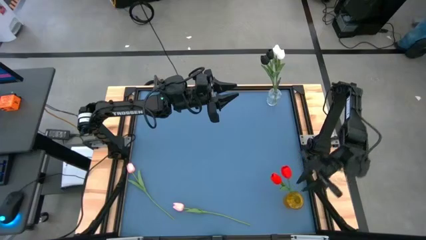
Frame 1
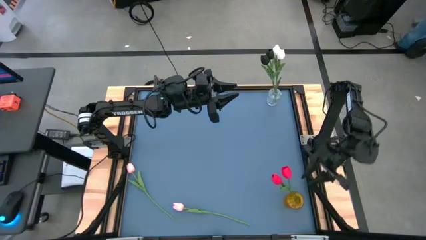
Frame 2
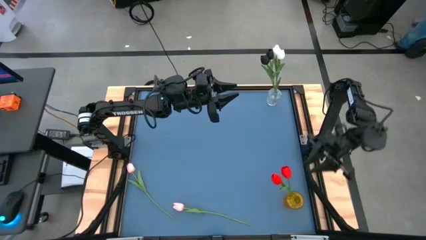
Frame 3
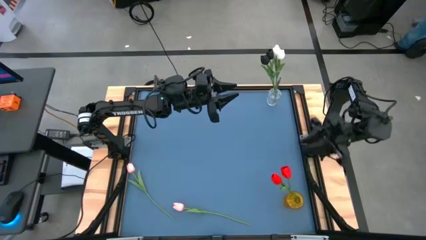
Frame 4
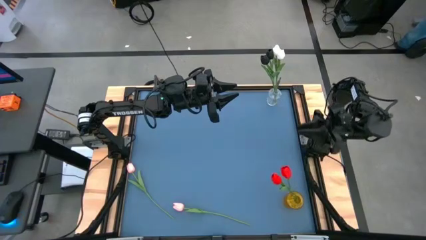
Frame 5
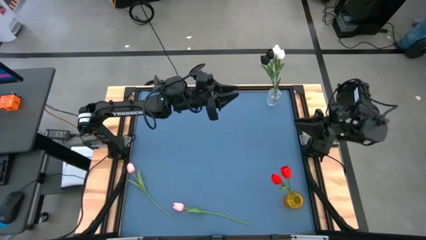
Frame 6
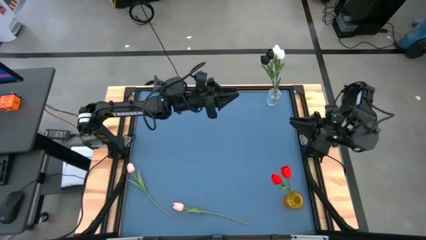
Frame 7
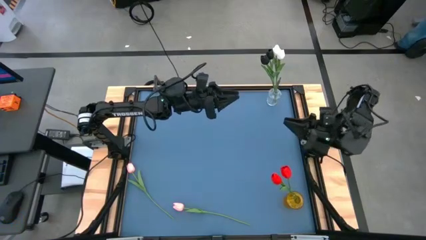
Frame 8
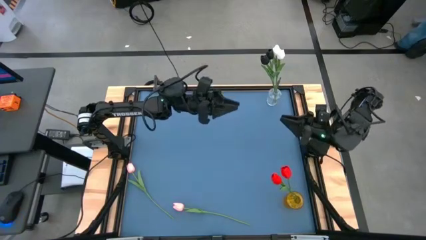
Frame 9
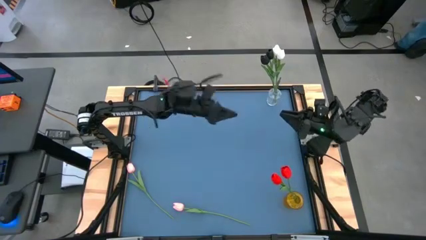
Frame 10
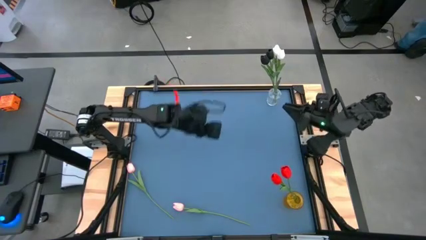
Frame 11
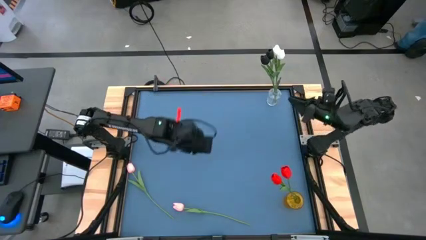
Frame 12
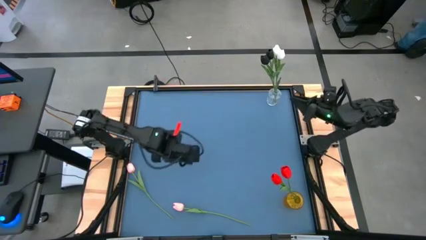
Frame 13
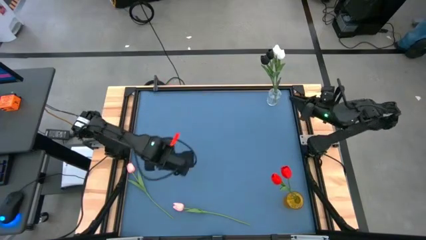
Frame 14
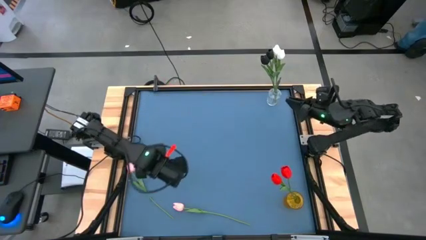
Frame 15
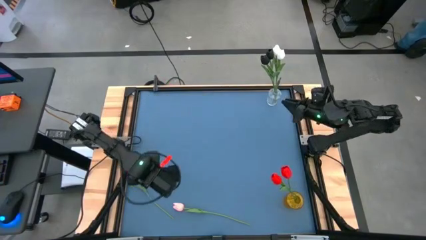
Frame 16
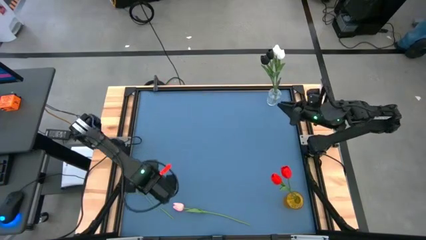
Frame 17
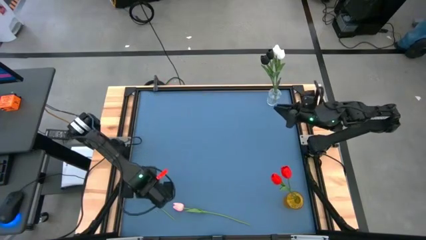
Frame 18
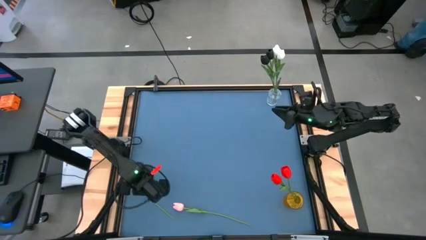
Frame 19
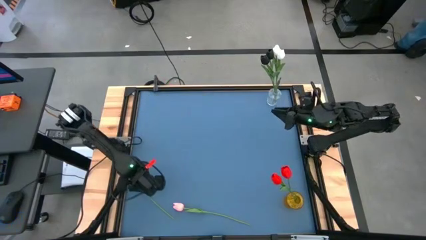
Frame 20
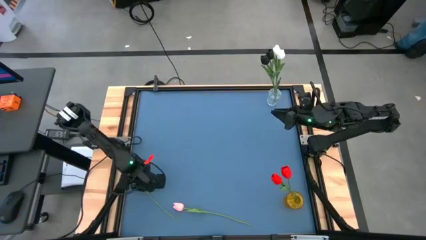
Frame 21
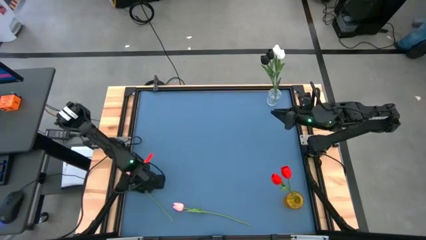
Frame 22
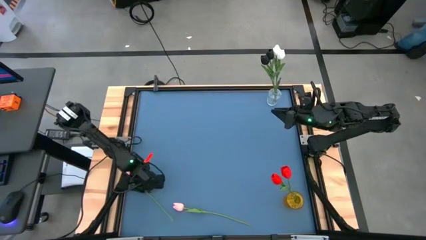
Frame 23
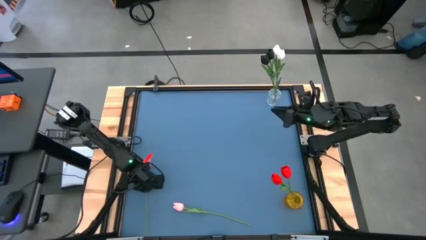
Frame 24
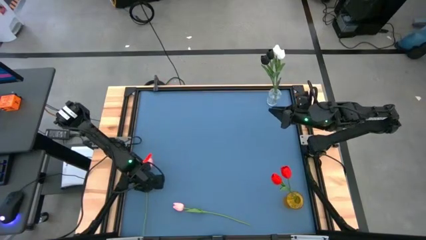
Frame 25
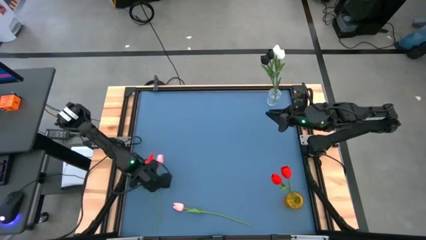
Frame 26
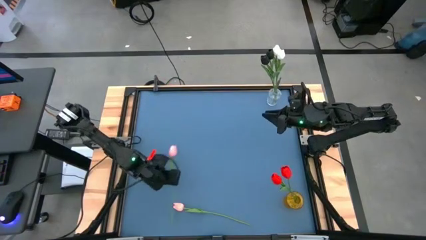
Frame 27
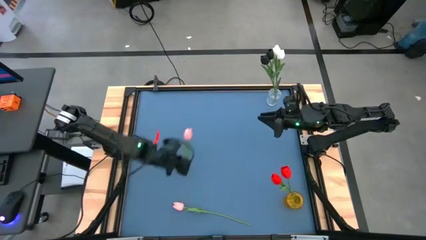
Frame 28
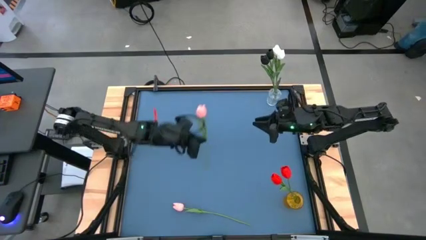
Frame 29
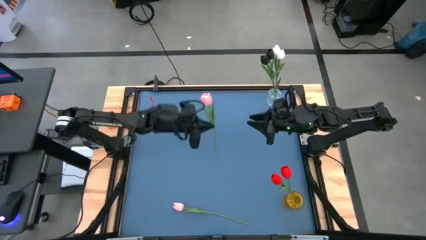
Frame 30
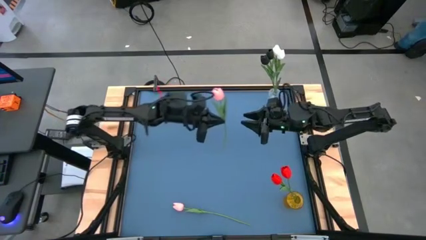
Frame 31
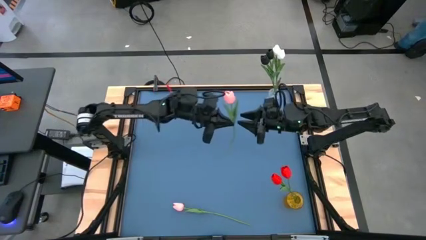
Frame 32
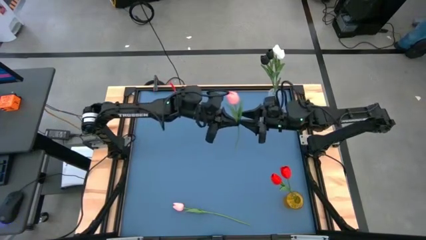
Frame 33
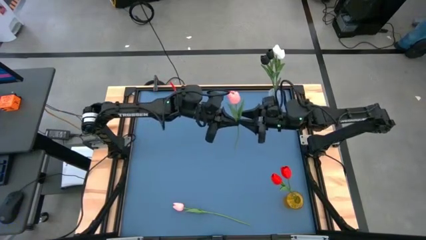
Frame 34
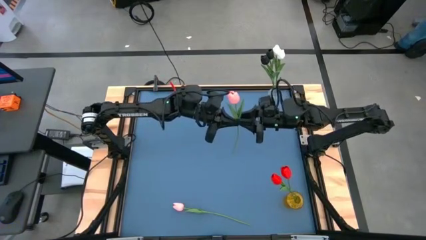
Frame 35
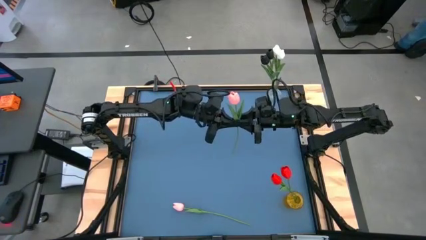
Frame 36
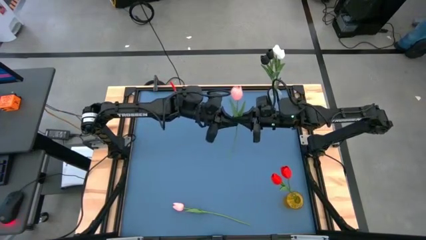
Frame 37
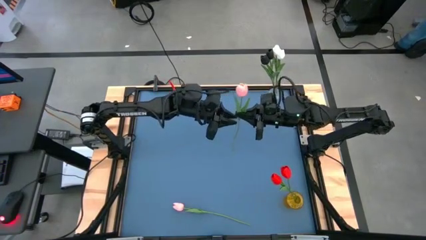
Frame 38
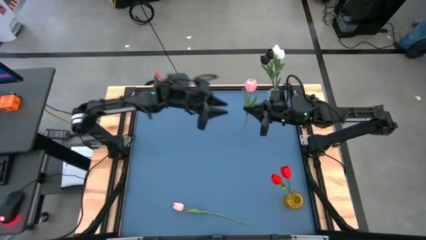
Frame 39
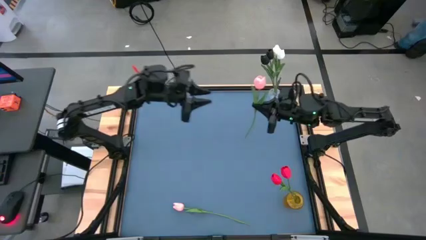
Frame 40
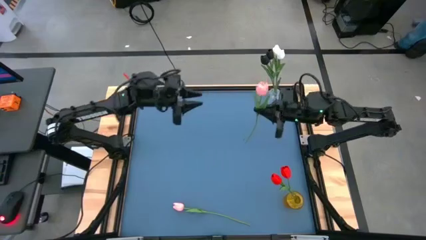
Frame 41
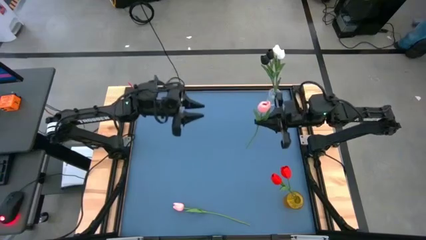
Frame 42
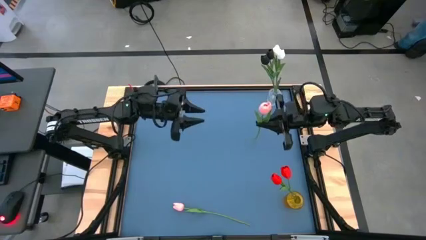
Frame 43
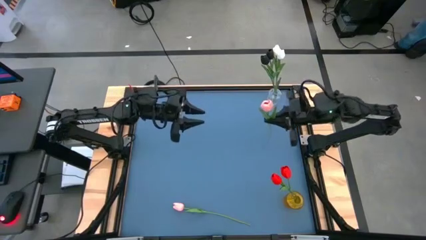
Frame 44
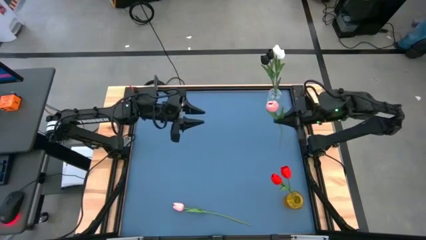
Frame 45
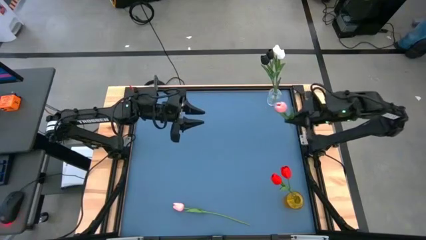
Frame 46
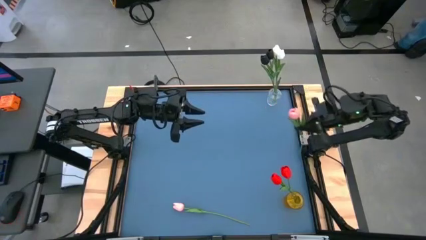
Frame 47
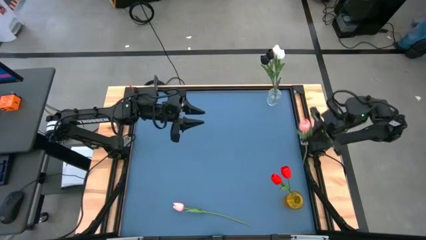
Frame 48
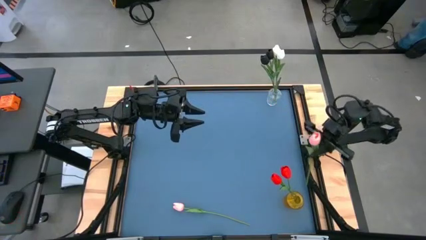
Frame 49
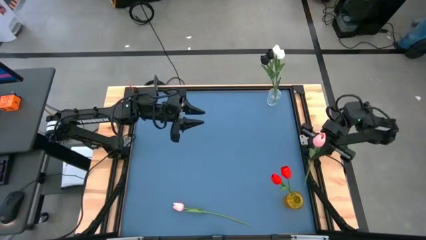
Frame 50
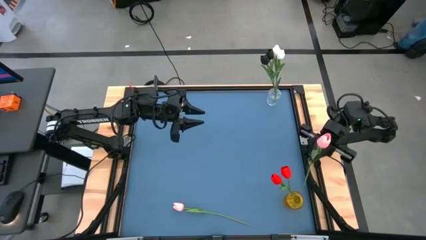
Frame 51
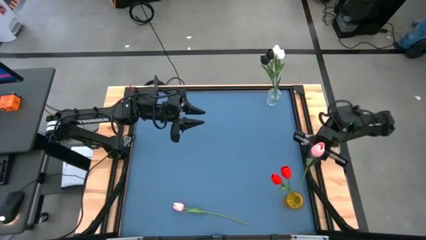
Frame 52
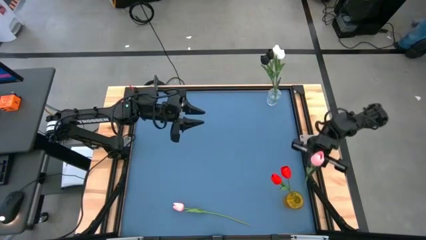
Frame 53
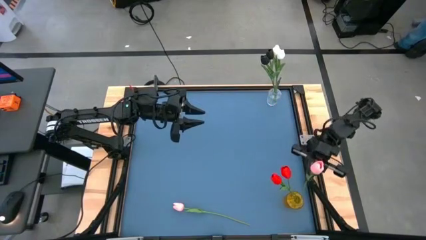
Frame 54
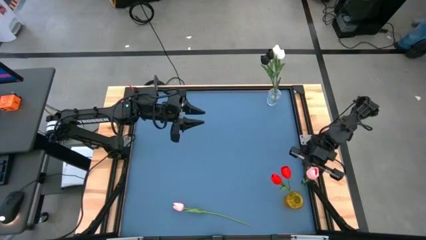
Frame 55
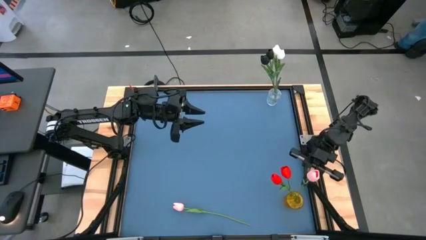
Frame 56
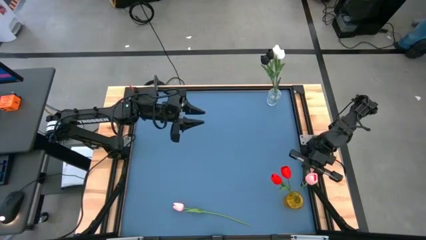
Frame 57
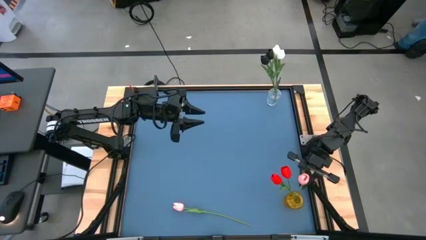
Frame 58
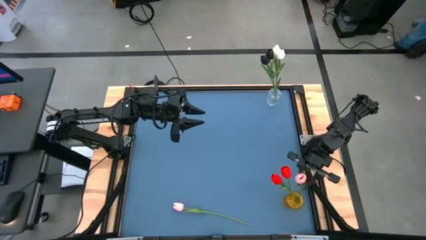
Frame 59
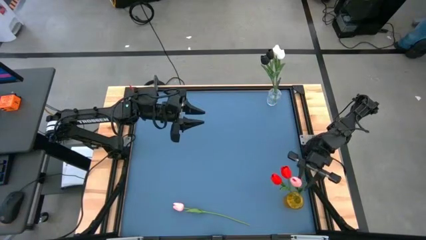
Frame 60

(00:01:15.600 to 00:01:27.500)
Task: Sort flowers into vase by color
Put the left pink tulip into the yellow vase

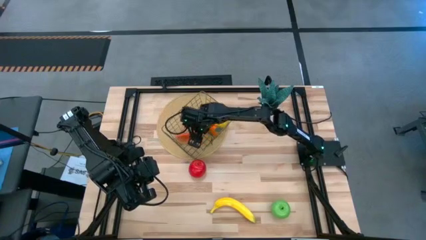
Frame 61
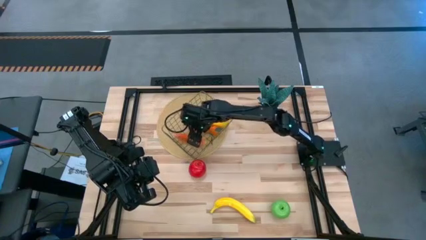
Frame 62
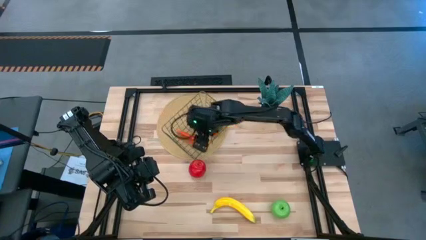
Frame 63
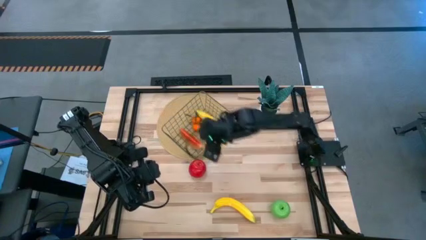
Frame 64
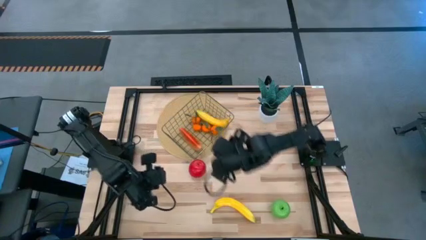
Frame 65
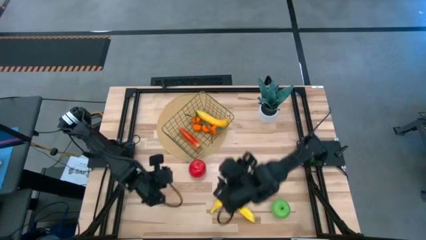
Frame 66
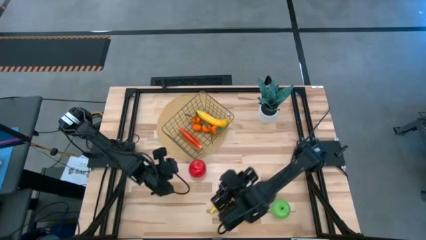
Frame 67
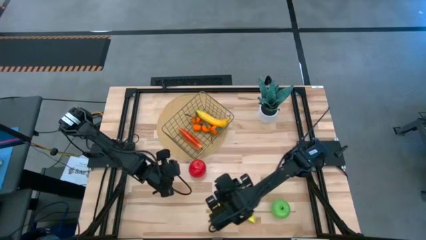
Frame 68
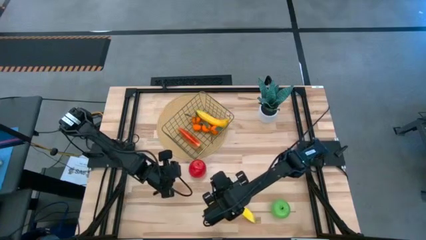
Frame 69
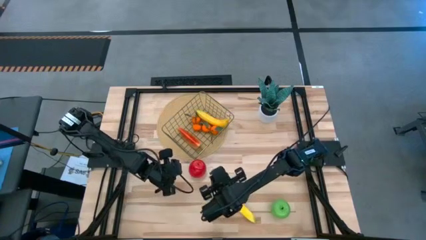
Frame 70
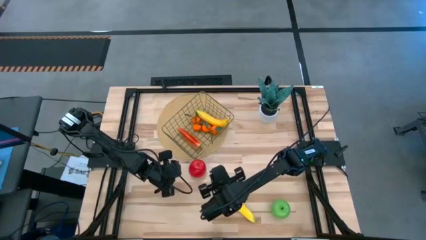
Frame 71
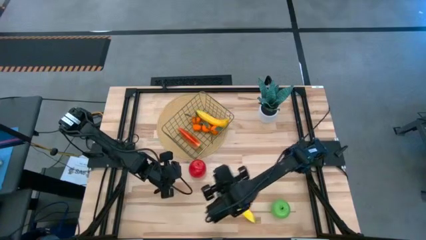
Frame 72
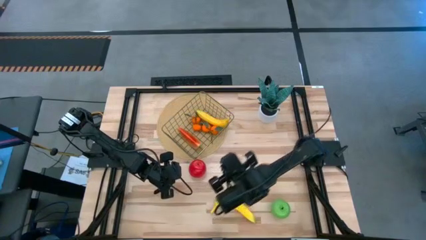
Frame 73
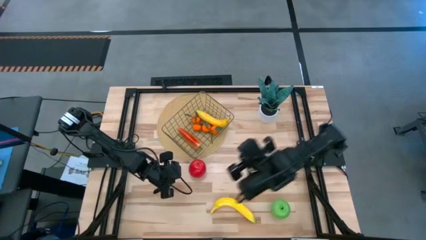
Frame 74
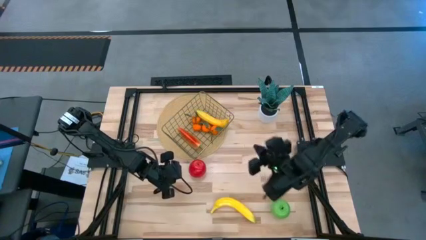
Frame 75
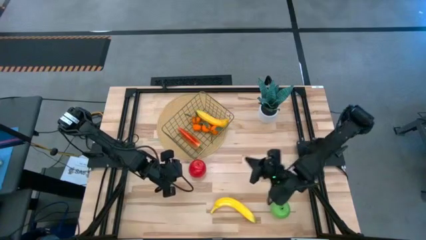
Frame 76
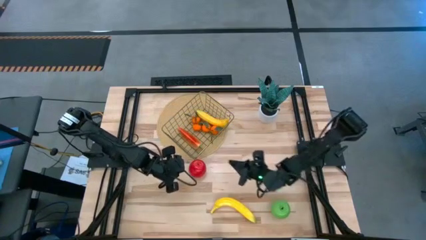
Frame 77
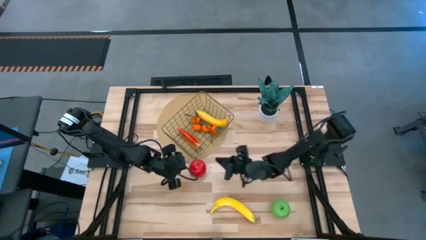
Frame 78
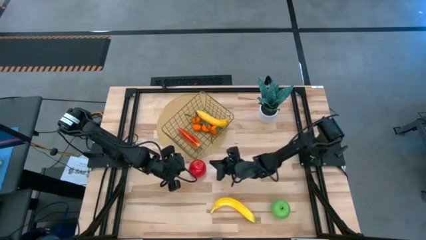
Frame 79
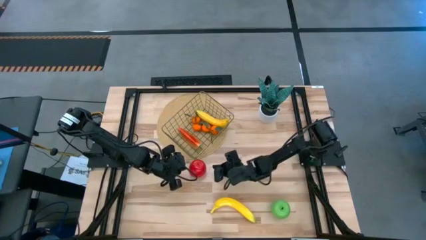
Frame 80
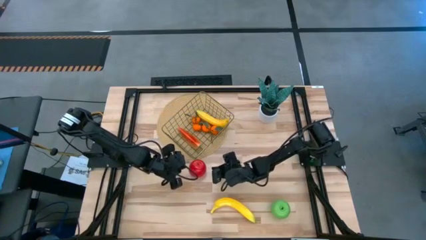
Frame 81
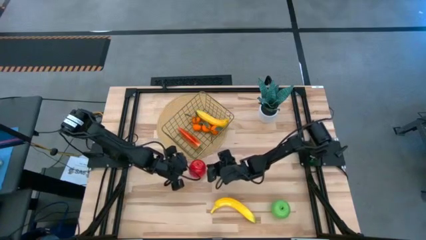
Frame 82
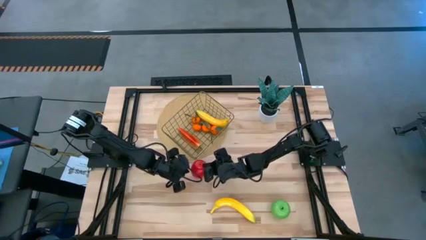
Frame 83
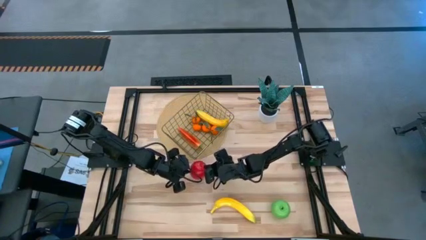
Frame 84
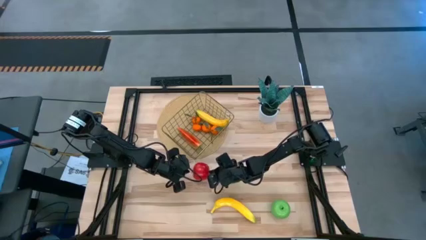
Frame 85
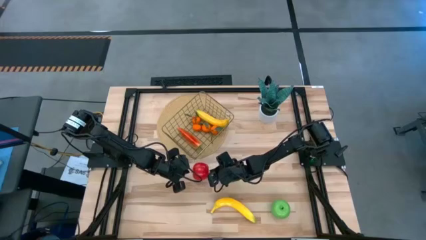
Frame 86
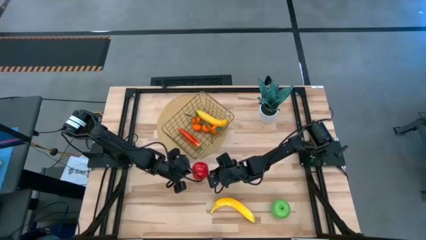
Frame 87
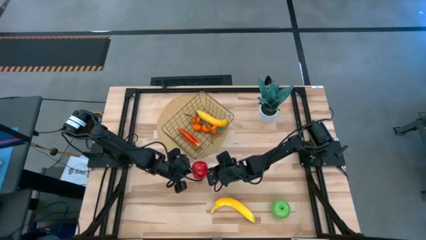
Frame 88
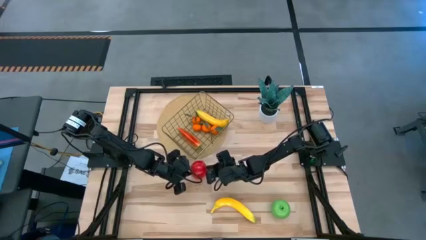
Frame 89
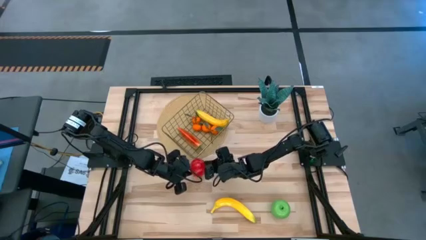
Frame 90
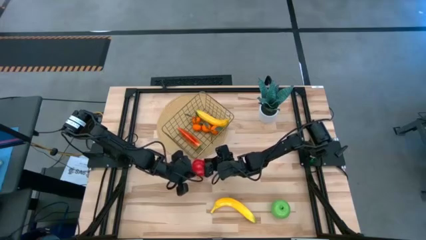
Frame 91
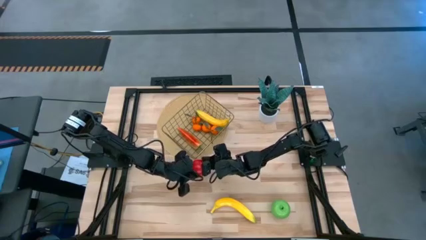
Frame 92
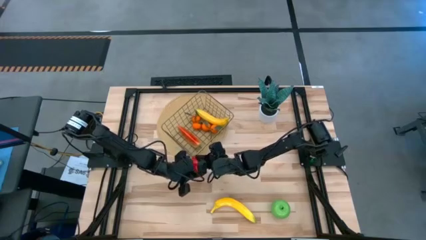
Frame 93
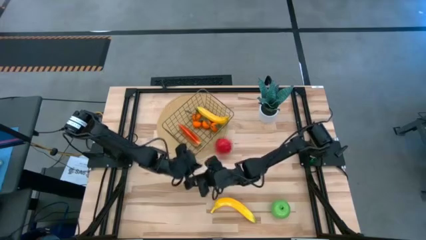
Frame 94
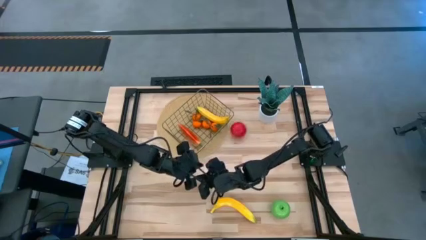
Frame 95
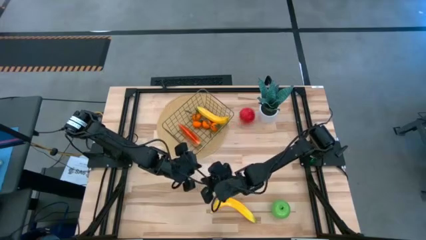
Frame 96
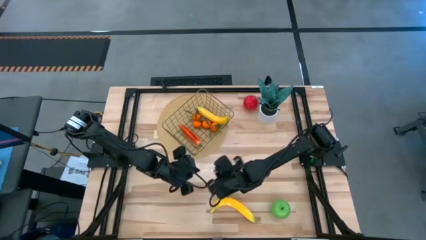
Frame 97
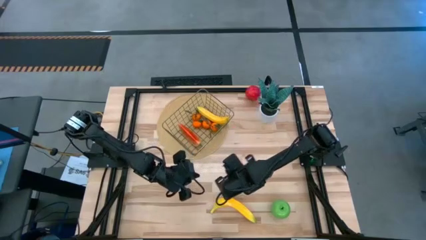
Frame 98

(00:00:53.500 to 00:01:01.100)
Task: Build produce basket
Put the red apple into the wire basket
